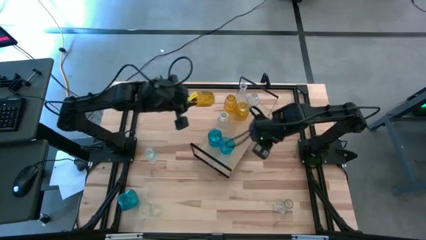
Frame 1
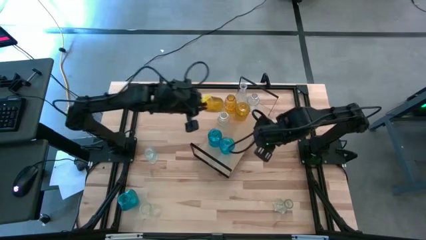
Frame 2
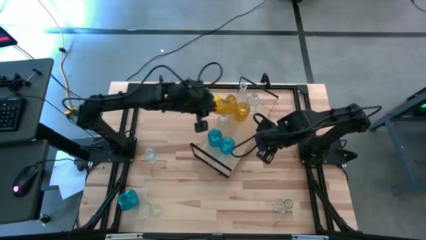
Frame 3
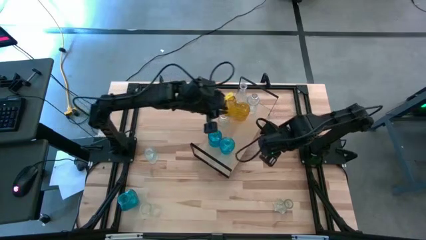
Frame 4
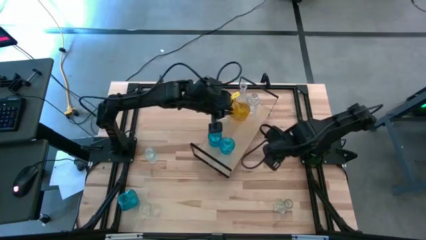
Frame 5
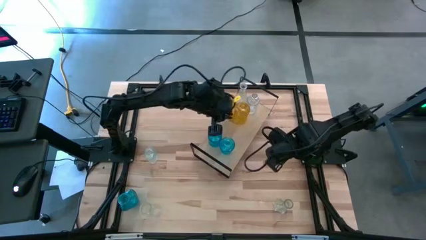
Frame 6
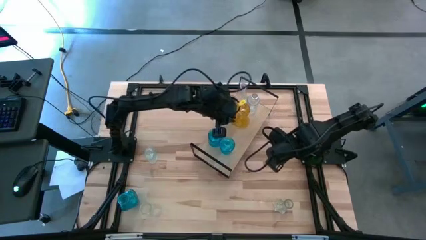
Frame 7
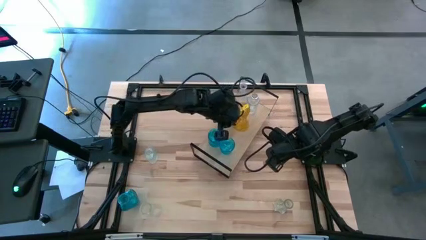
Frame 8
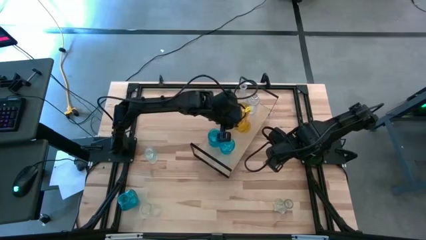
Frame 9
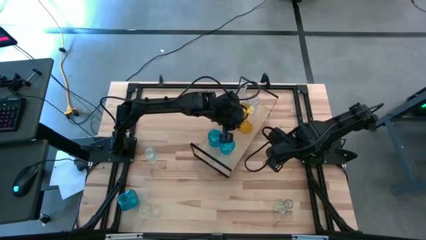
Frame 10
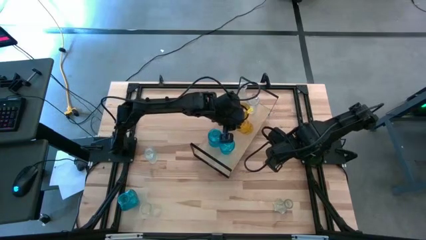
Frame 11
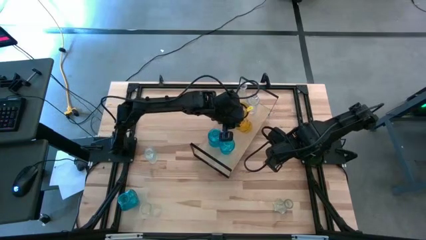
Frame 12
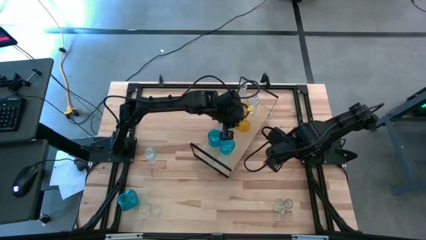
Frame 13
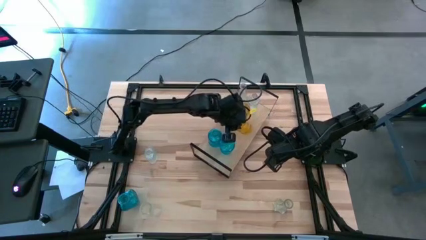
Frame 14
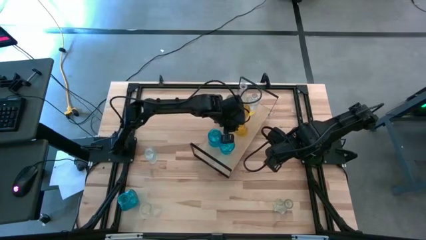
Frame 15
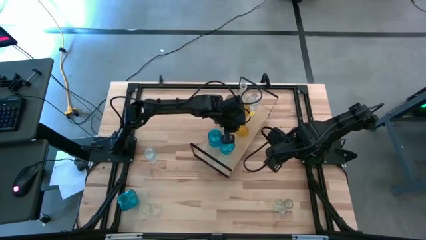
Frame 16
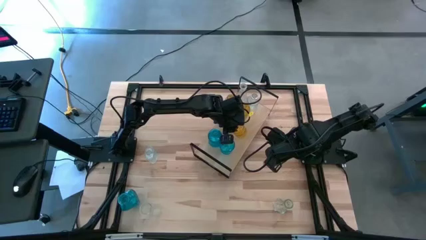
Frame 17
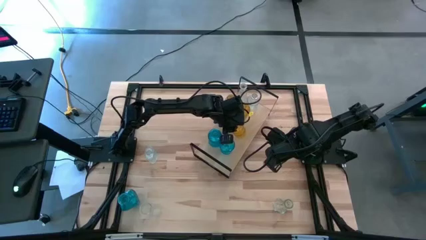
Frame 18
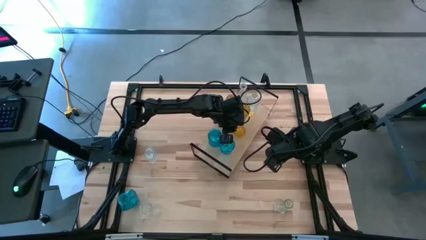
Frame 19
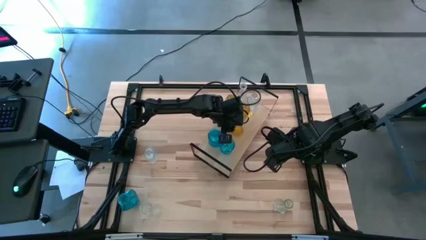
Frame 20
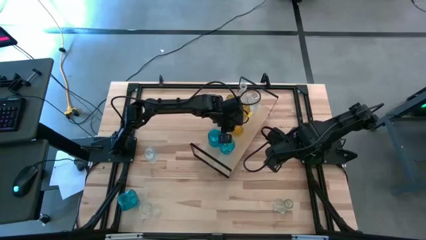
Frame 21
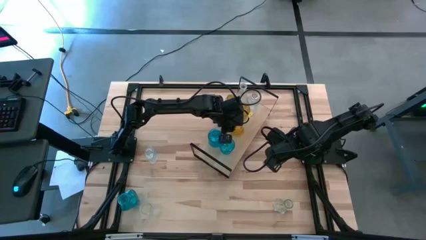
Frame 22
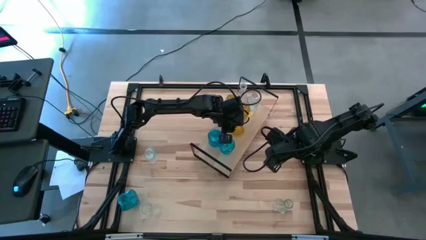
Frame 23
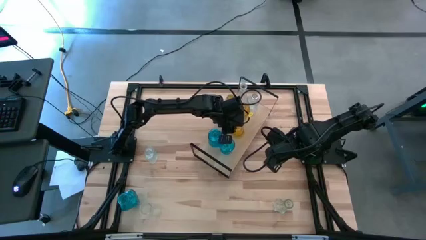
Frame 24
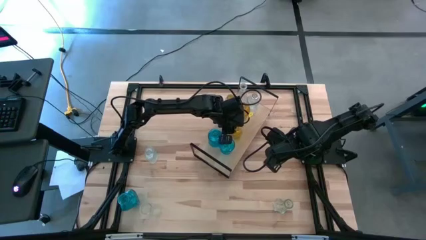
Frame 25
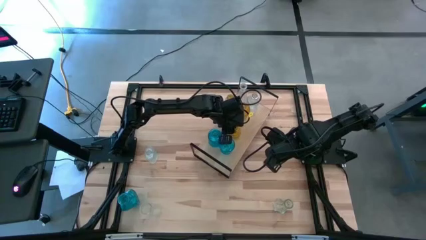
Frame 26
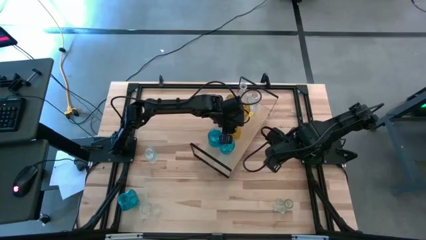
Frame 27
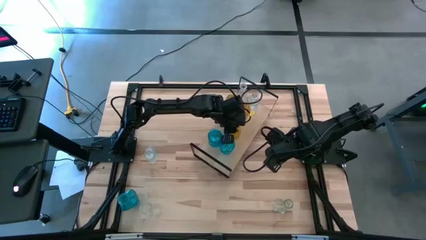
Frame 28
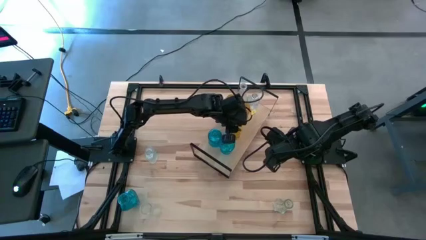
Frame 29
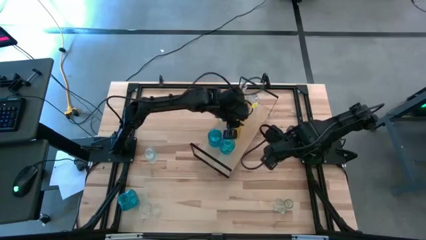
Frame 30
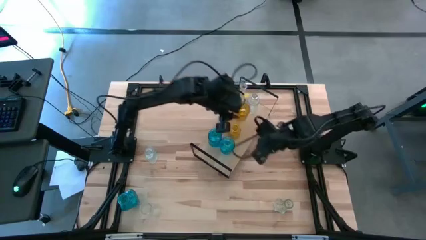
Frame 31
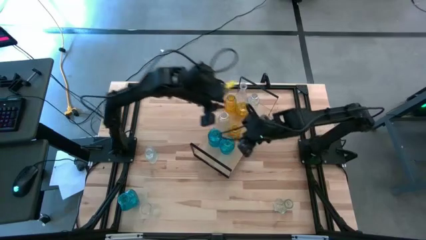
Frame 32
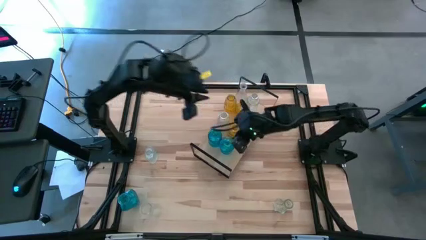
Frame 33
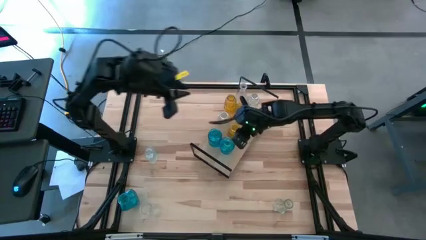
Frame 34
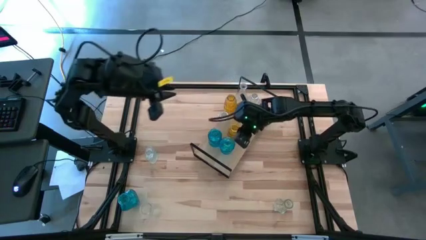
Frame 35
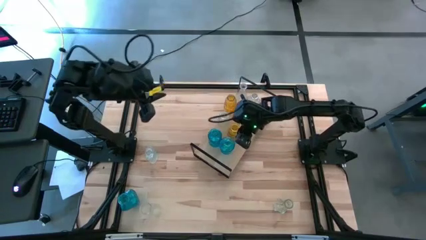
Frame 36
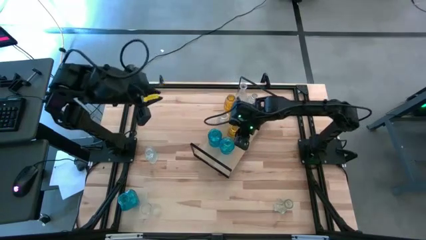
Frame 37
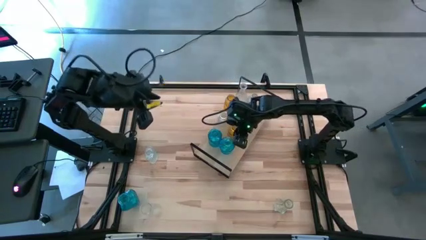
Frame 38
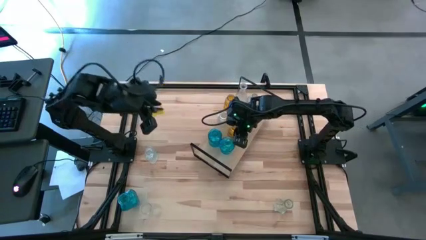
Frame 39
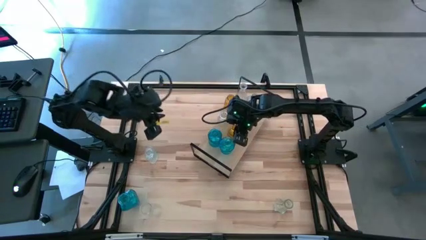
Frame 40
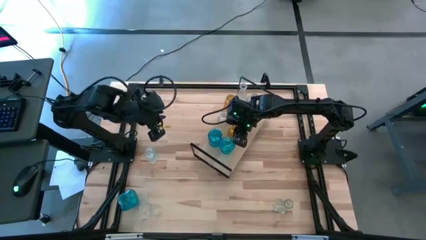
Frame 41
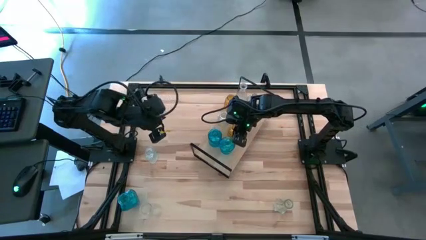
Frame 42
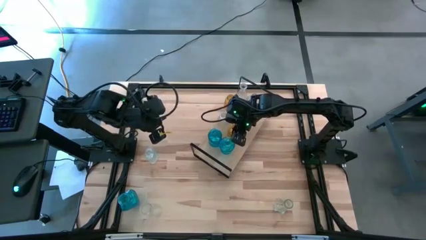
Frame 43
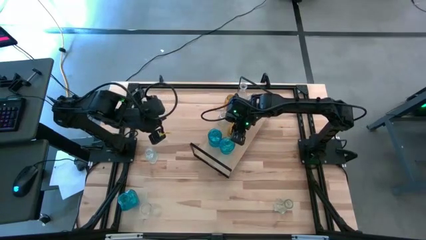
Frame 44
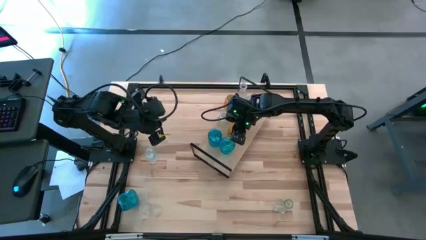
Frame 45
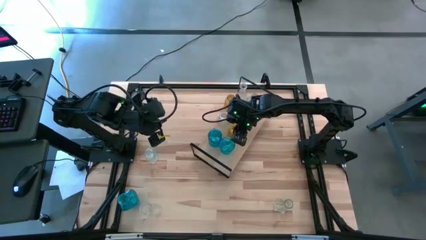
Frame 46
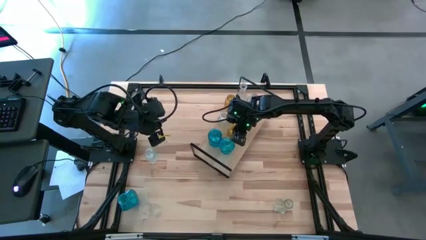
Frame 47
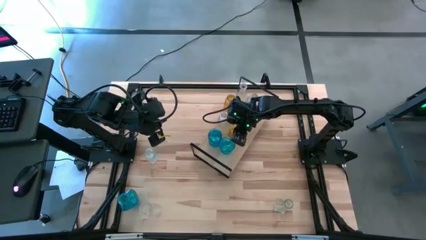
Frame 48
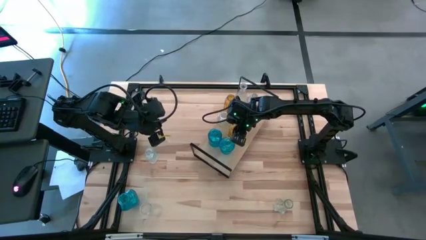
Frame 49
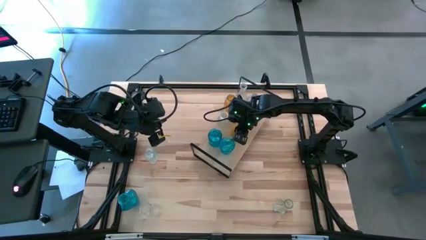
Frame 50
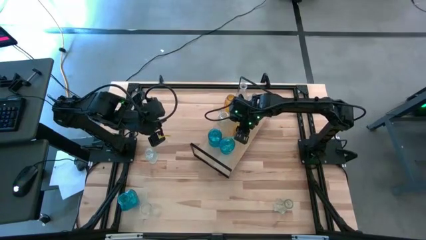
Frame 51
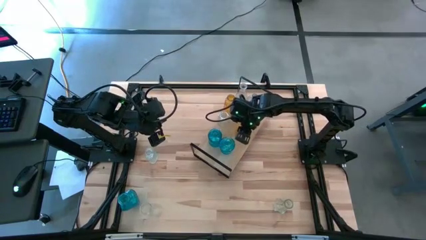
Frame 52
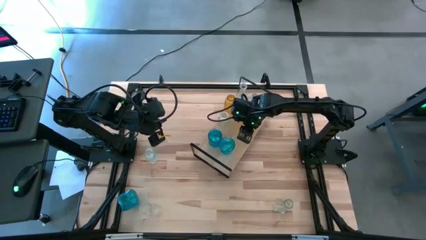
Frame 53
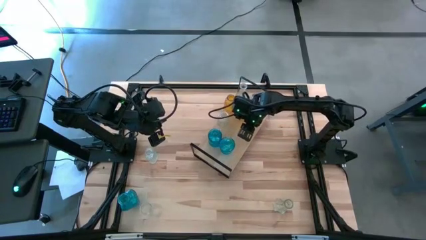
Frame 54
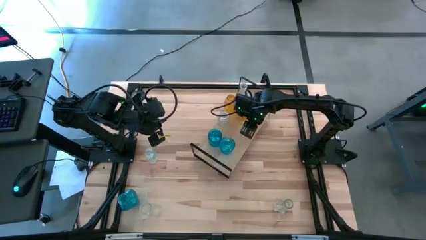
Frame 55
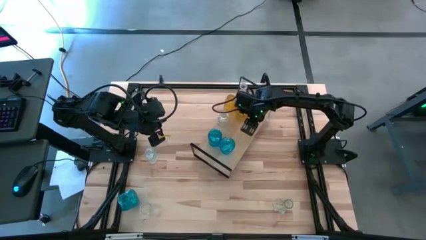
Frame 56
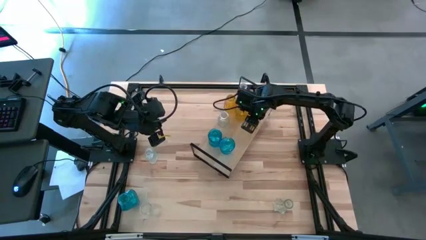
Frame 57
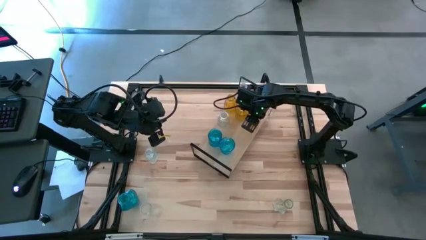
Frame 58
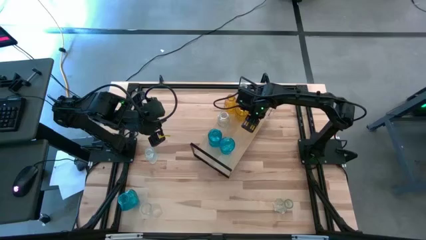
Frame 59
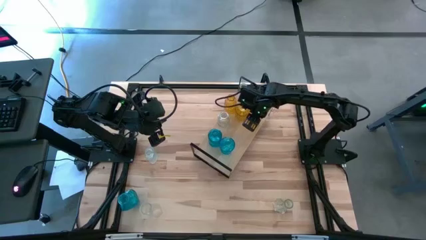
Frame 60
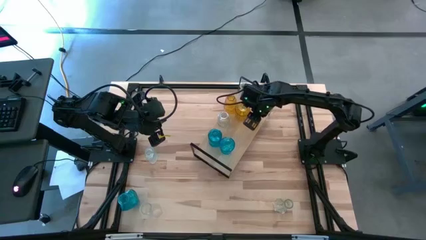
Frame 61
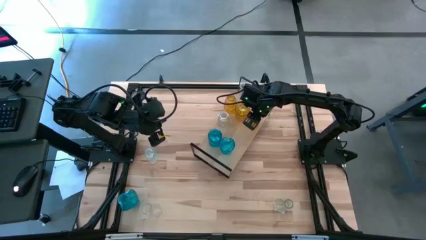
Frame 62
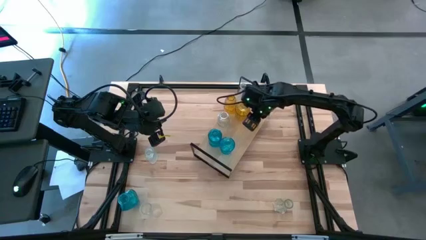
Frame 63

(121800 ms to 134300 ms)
Task: sort vases onto shelf
Put the yellow vase on the shelf and align with the other yellow vase
